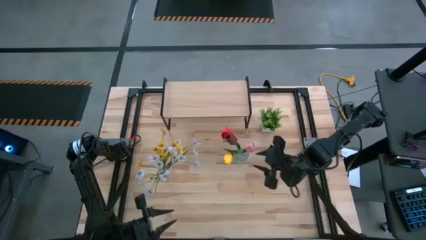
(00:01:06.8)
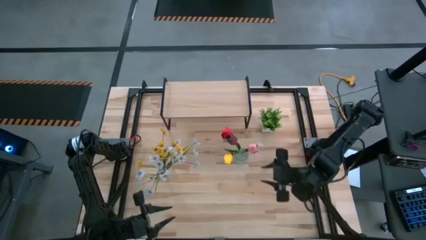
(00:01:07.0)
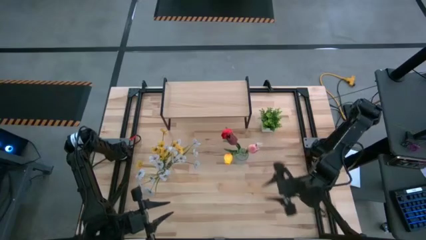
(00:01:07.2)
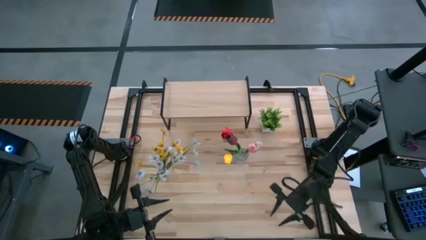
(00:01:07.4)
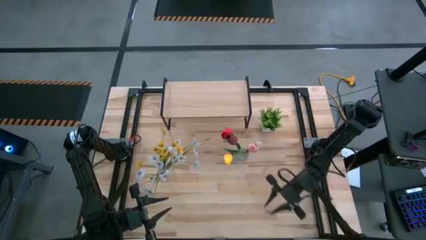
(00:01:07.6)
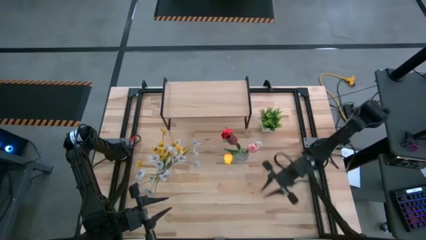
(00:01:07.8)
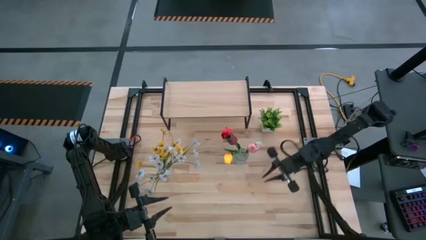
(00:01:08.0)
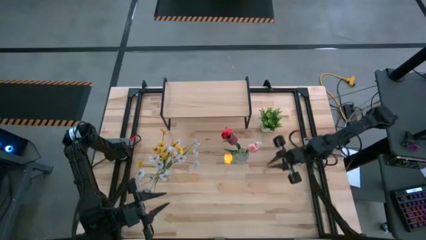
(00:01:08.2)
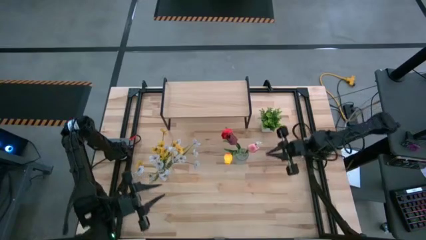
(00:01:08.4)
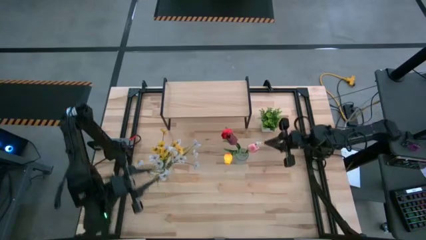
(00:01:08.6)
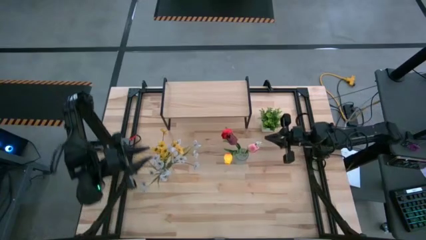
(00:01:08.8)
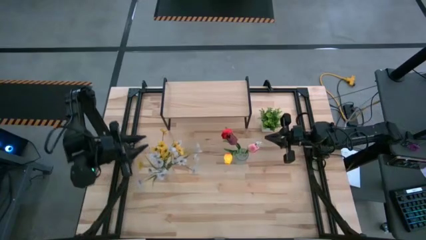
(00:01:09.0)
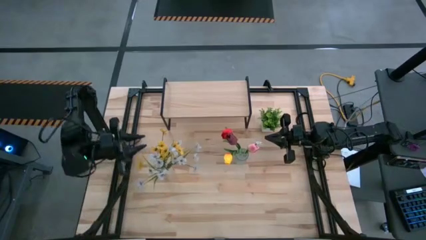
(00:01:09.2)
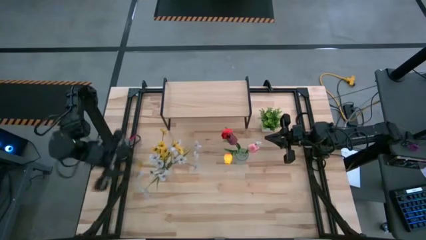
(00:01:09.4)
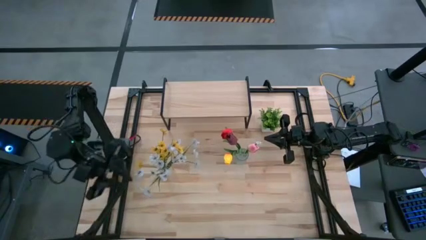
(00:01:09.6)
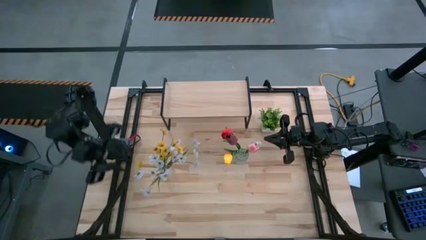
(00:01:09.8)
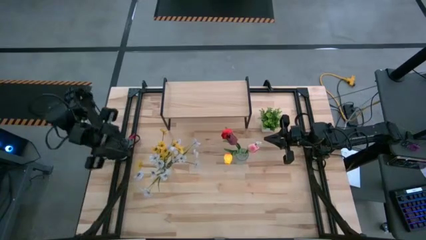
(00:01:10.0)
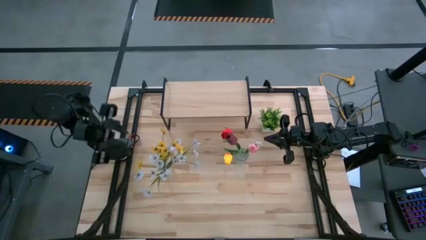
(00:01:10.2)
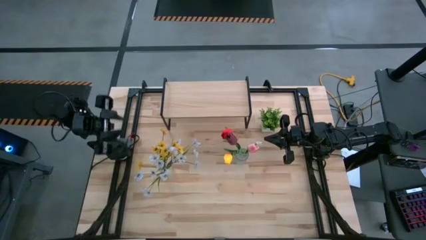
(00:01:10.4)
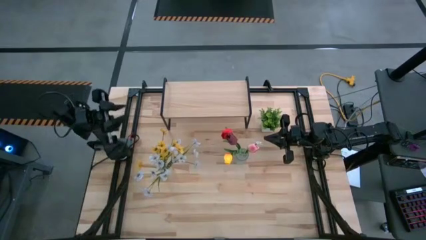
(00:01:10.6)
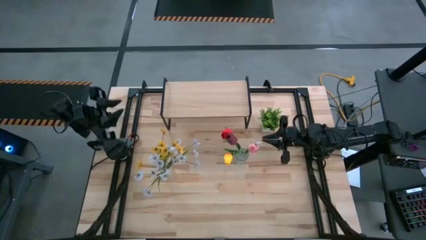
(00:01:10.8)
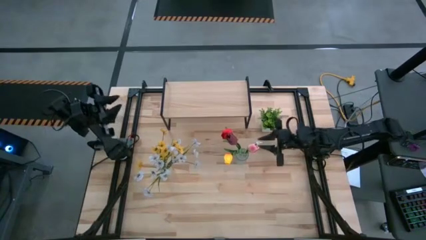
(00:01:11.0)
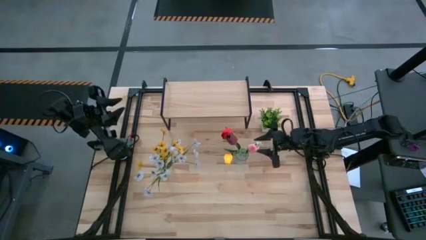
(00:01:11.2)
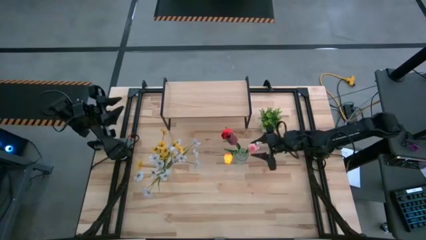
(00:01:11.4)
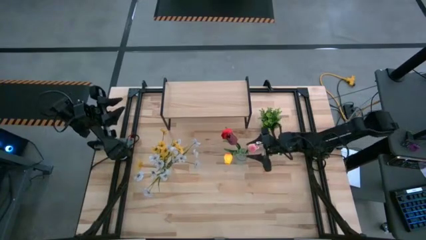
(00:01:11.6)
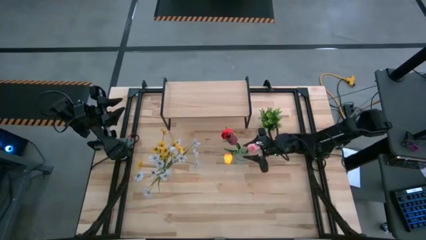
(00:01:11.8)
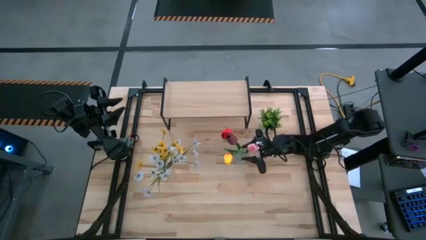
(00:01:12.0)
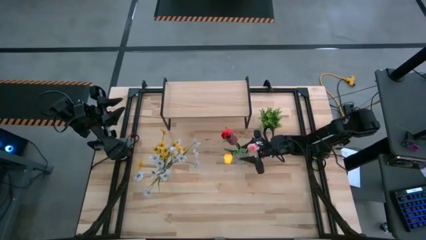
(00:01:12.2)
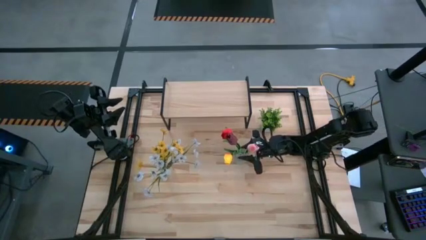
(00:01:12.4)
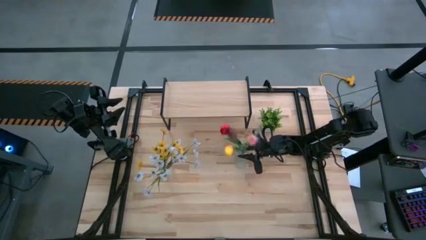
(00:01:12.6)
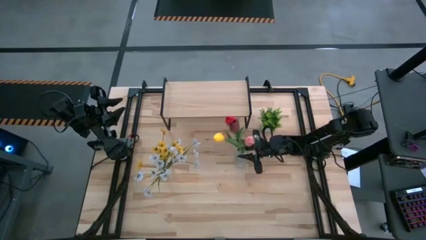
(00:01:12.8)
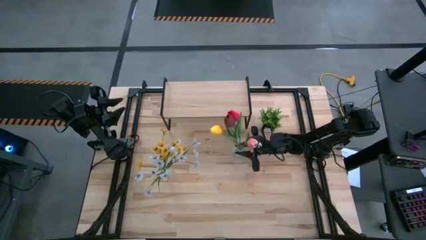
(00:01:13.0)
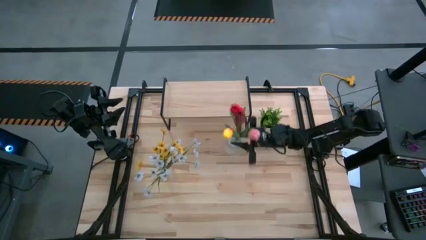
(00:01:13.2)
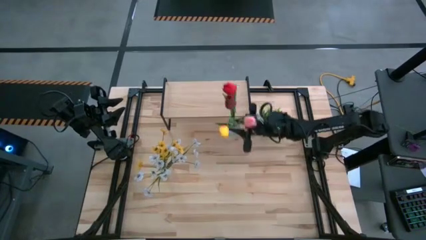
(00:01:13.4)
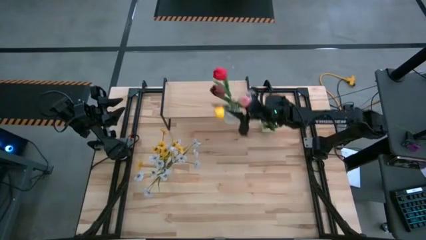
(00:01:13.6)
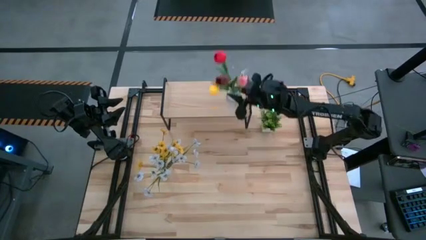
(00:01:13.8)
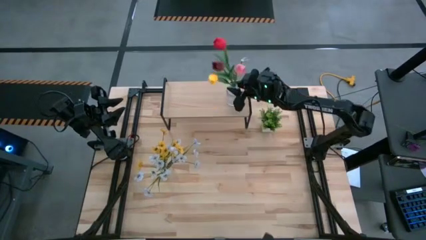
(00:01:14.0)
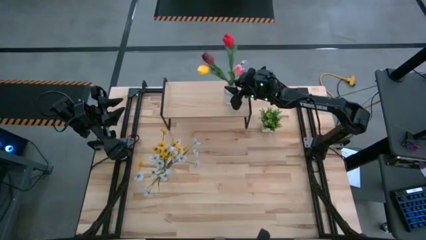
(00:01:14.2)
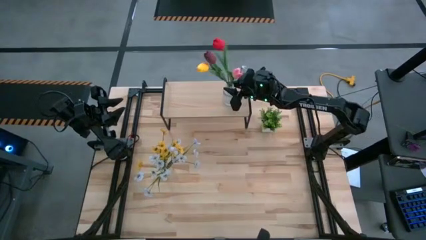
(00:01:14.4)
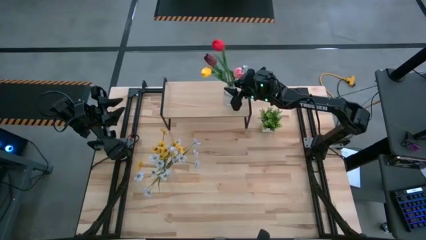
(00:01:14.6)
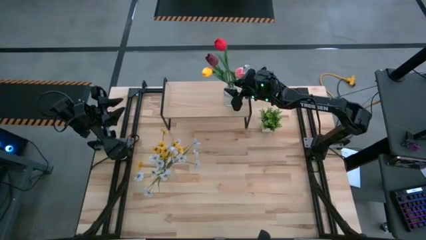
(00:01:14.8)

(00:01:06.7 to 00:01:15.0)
Task: Pick and place flowers into a vace then onto a shelf
Put the top transparent vase with flowers on the shelf

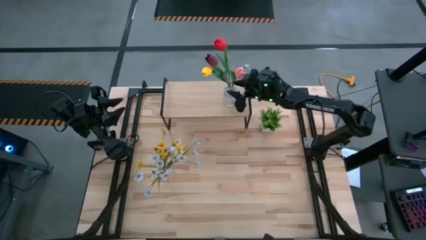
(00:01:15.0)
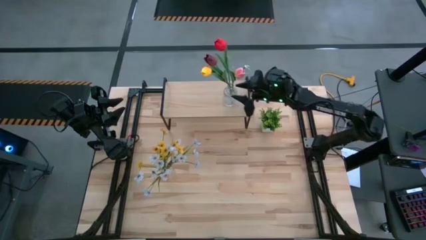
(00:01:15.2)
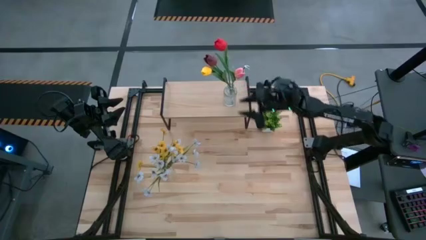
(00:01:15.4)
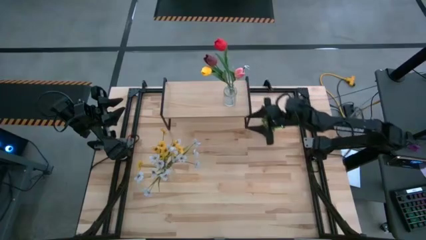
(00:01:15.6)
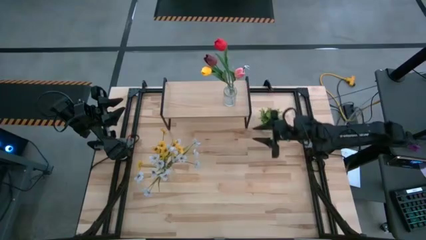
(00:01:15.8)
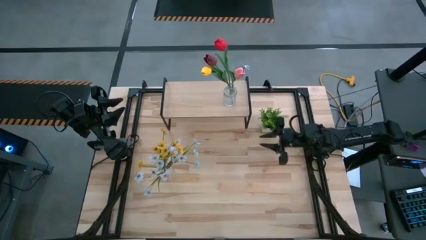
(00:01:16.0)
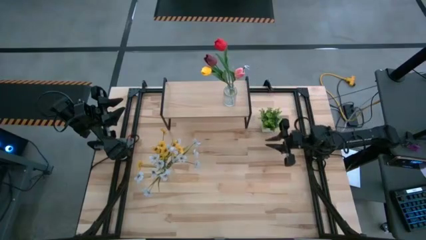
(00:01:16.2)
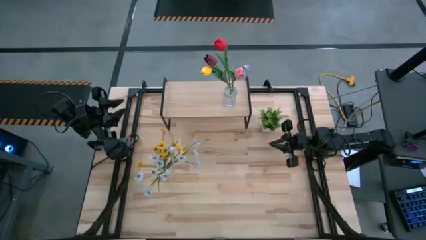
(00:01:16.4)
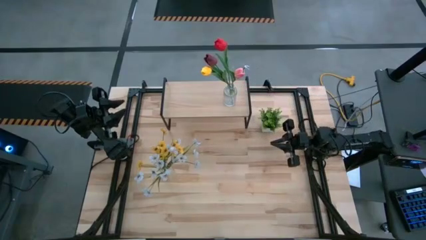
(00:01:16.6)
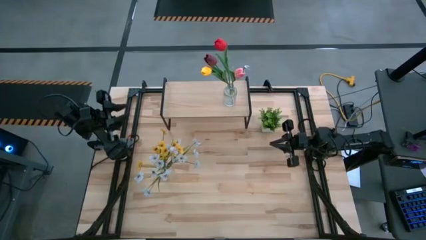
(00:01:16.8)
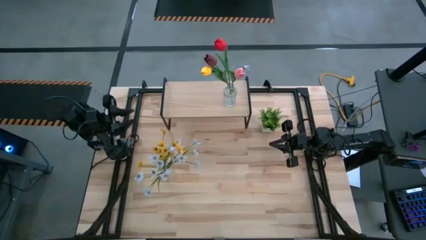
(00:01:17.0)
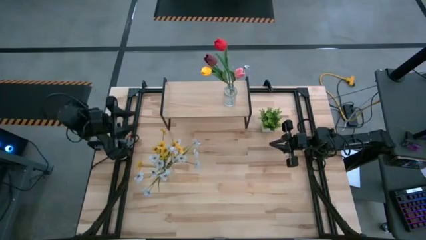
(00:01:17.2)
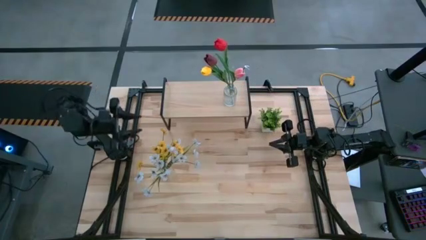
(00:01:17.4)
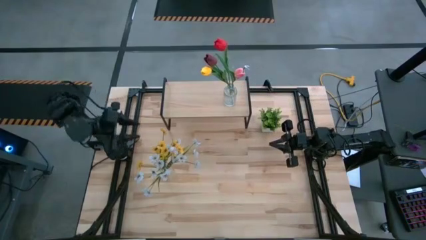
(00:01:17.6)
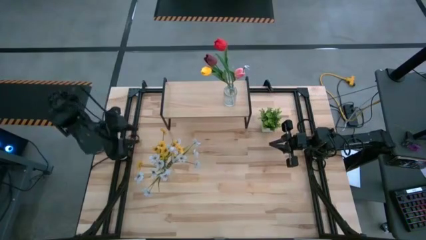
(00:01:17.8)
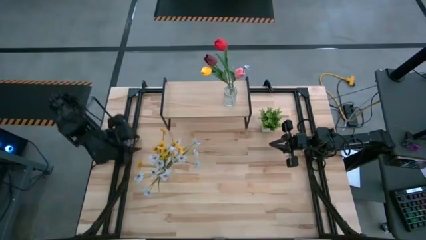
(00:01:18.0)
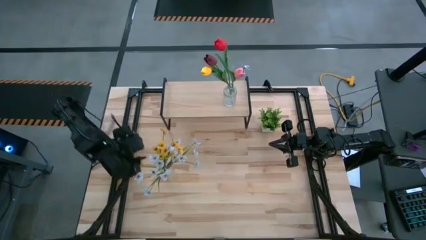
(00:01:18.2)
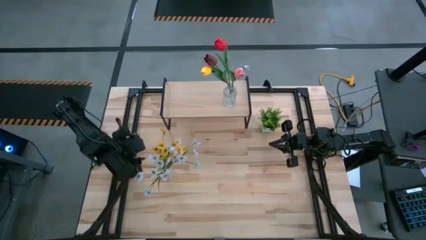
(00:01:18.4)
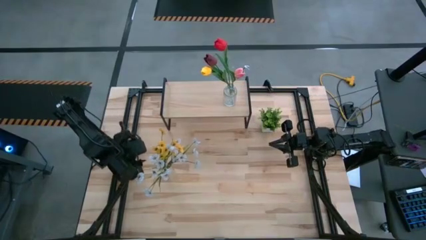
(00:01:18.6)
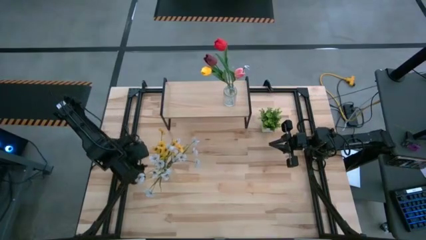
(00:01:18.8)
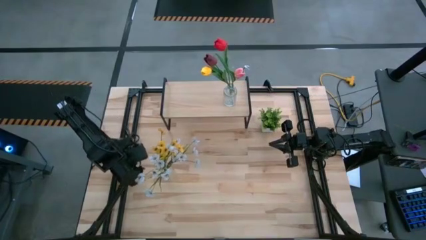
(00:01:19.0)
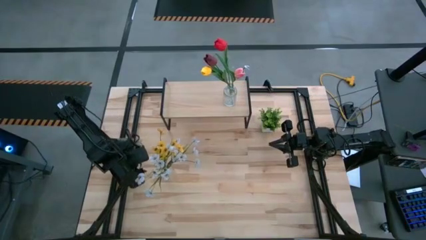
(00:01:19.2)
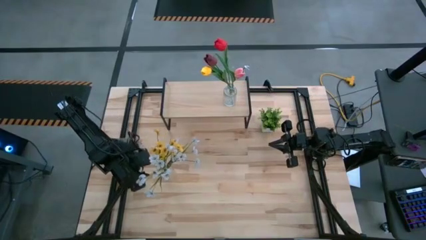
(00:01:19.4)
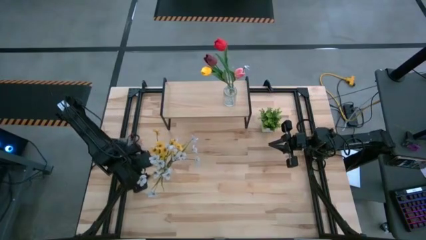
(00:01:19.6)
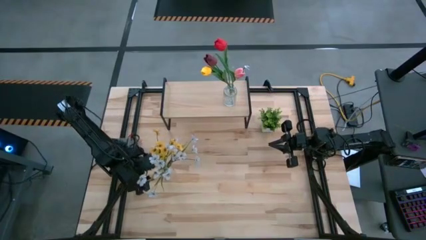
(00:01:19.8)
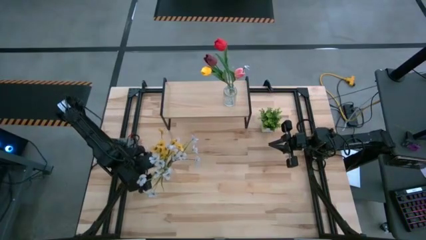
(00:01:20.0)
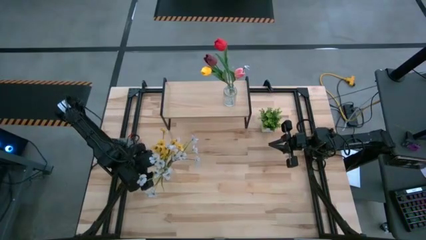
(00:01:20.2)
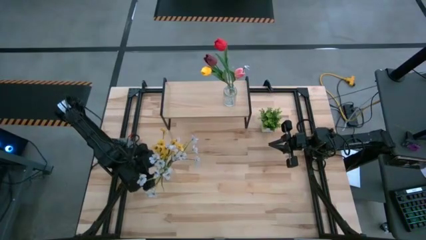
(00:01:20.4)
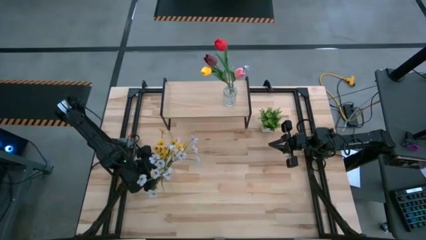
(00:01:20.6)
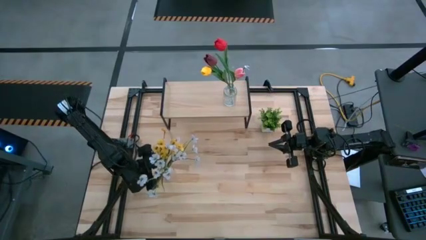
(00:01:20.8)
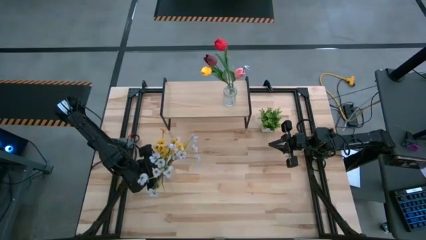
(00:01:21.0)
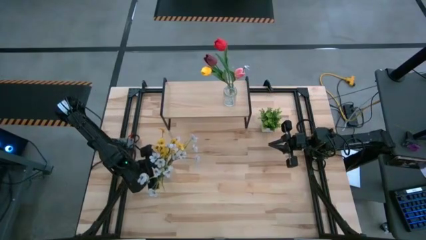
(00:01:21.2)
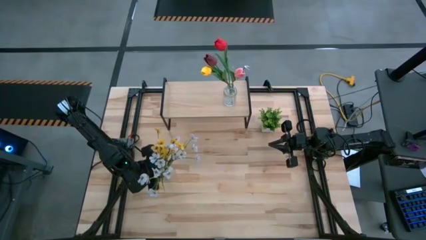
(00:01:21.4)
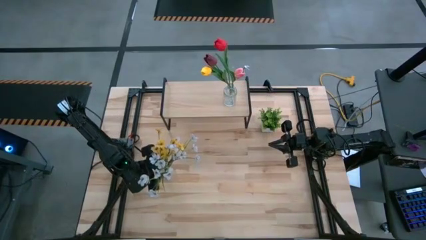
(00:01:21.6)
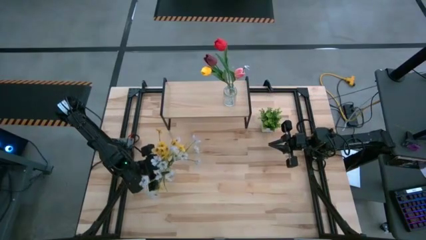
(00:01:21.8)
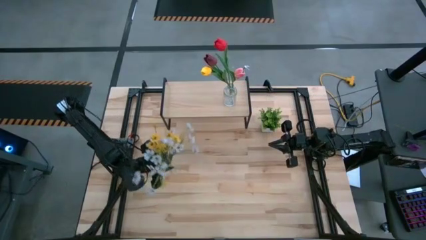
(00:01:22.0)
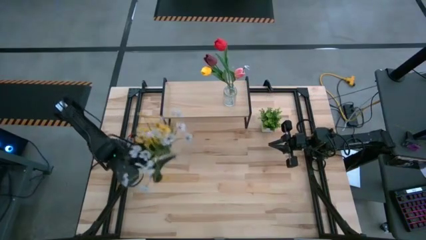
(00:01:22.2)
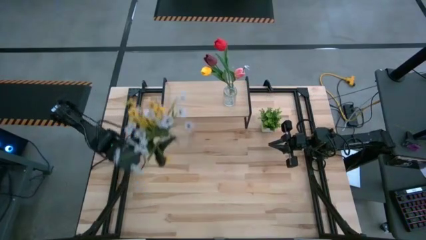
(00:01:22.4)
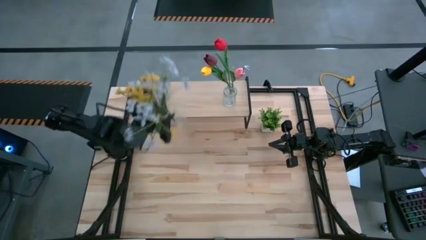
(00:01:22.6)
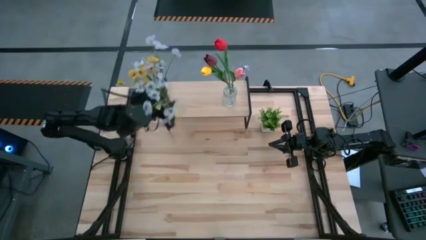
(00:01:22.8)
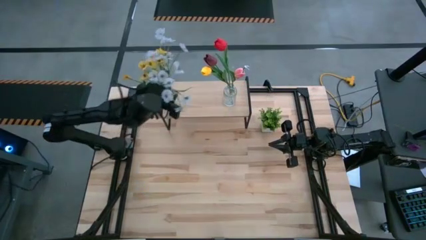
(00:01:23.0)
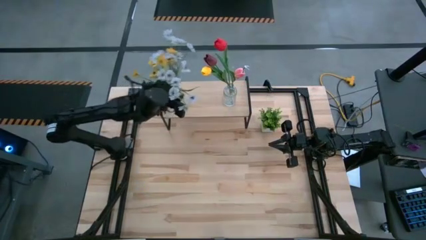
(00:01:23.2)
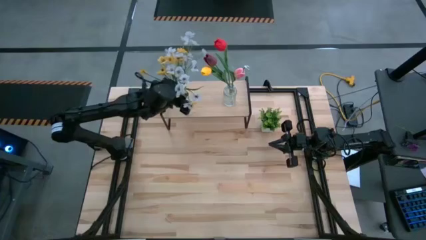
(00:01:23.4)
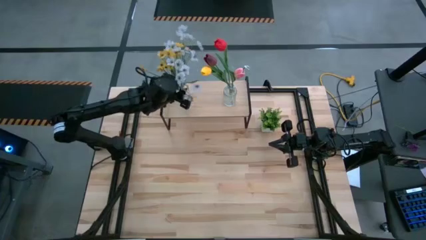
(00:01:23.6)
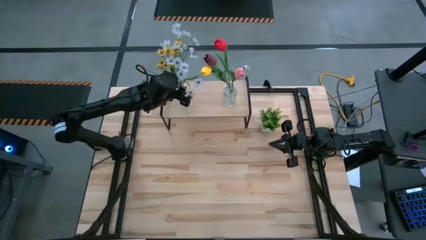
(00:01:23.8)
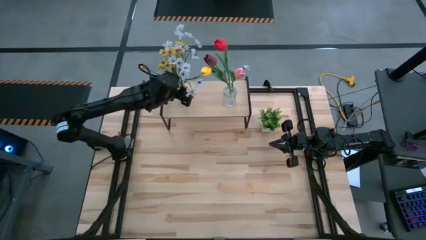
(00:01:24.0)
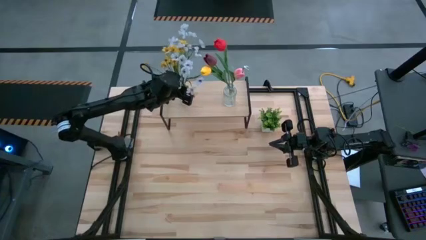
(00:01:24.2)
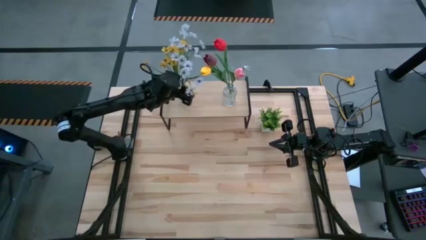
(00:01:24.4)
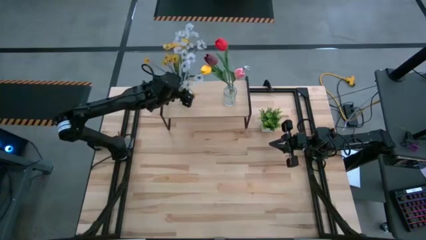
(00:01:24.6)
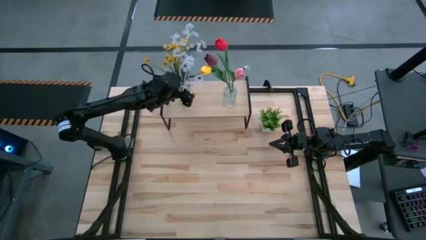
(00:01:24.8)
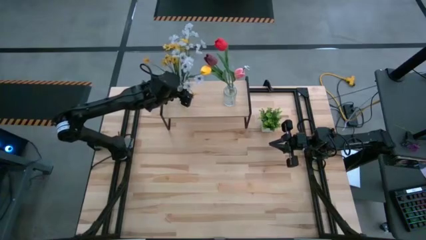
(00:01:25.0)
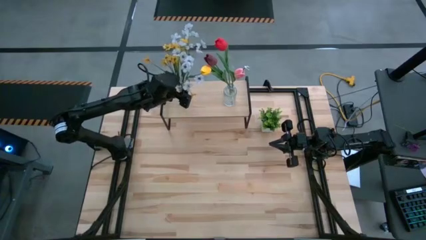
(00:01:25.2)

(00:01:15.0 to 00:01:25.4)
Put the transparent vase with flowers on the shelf
